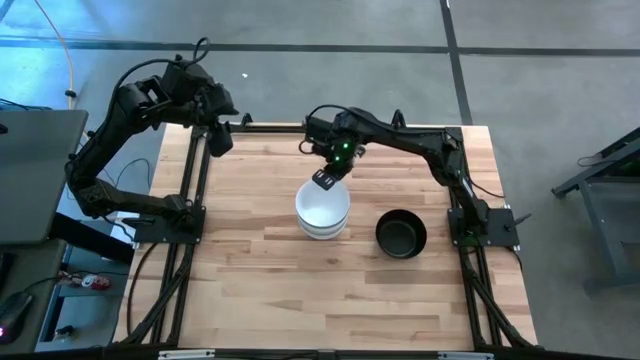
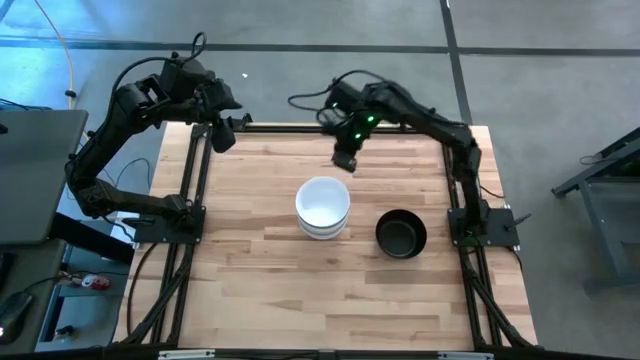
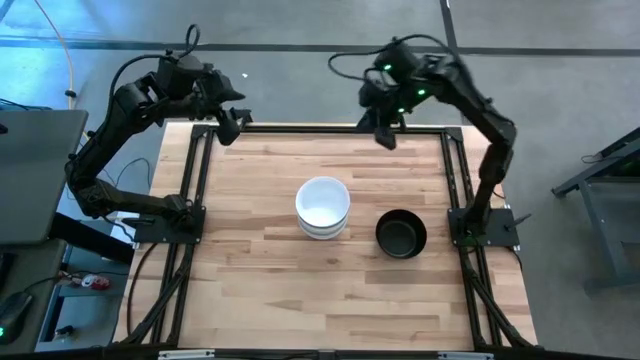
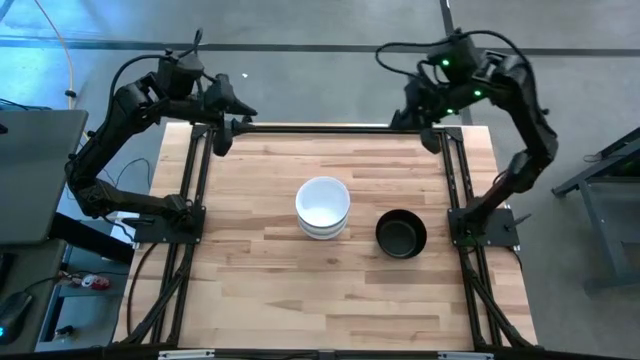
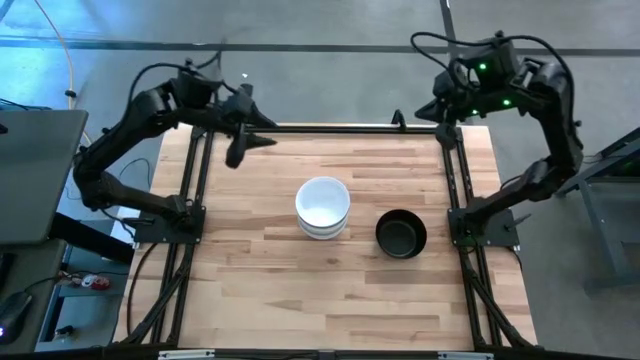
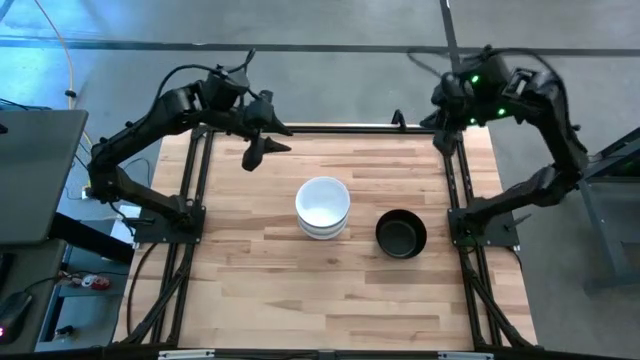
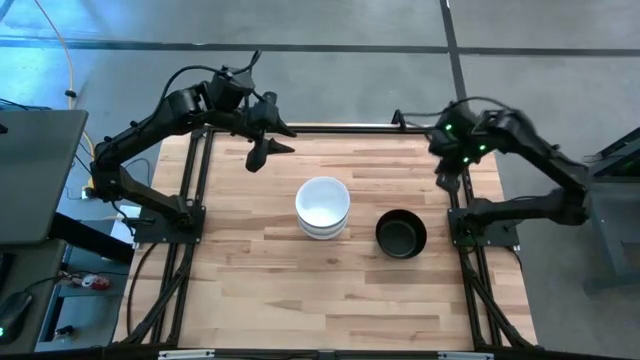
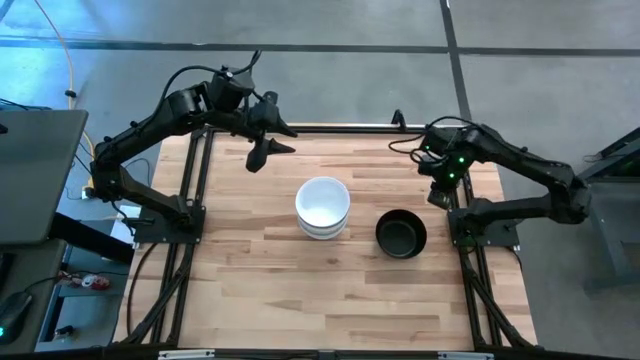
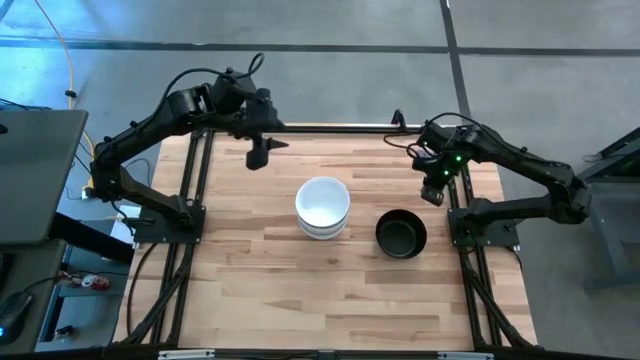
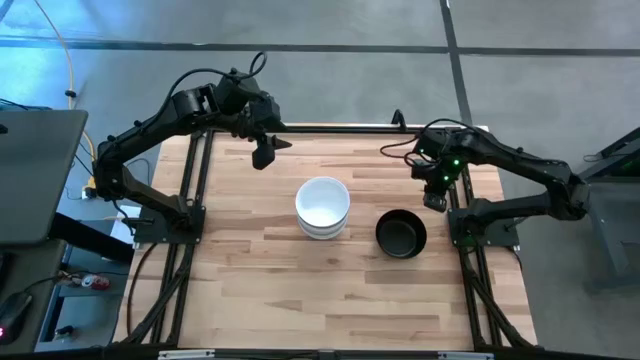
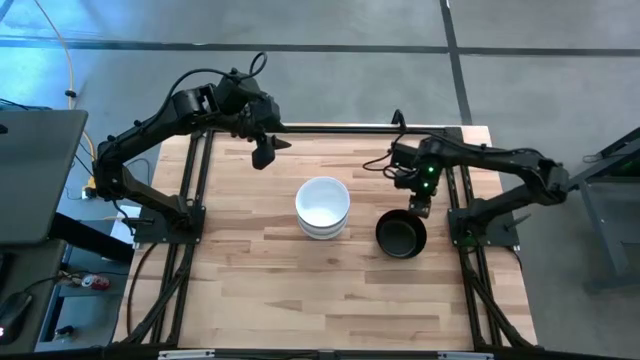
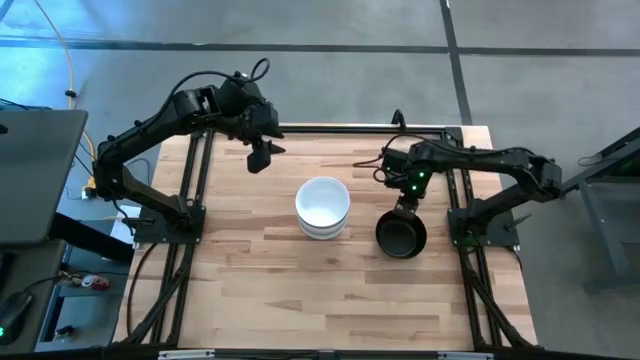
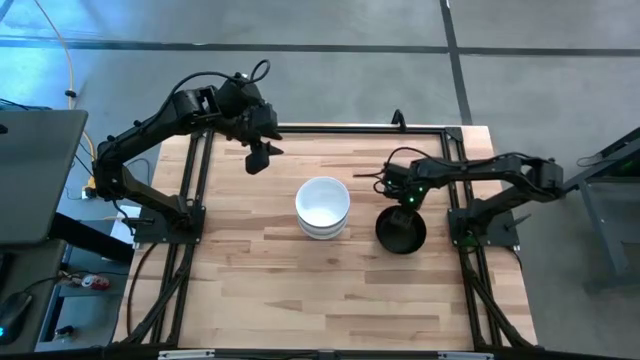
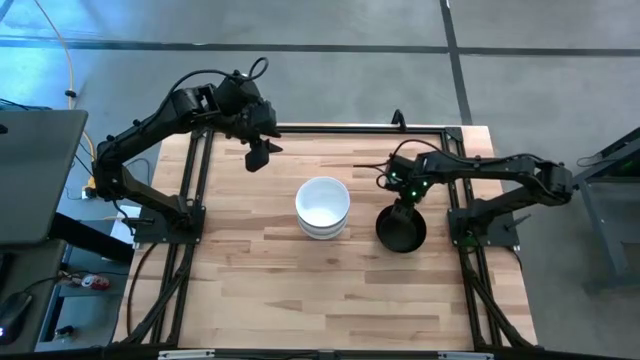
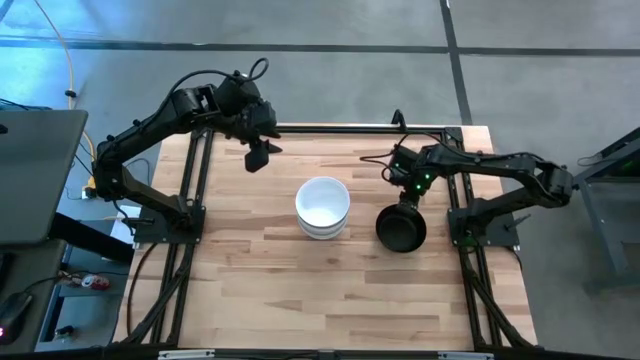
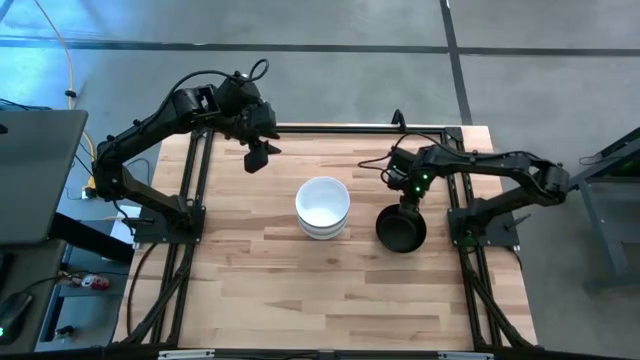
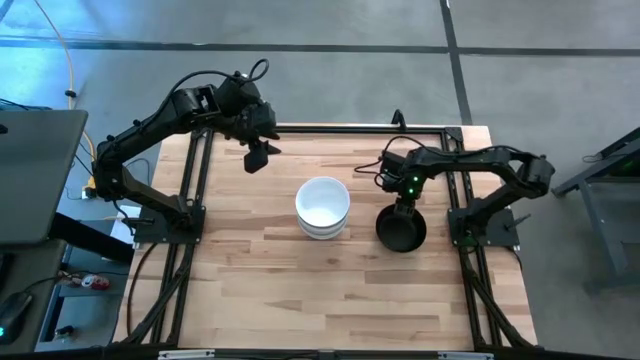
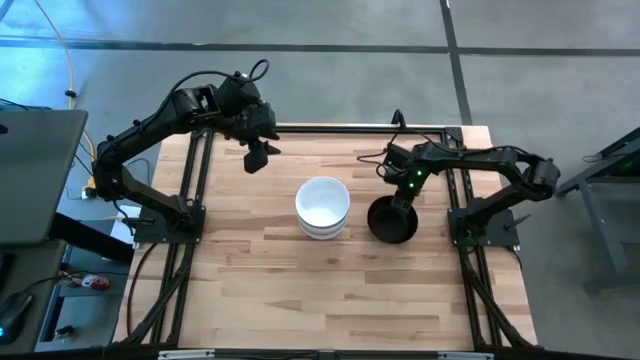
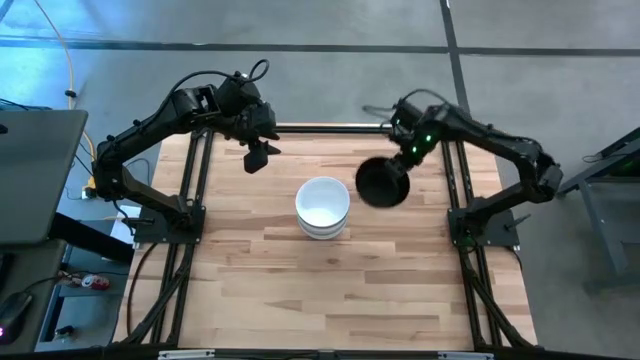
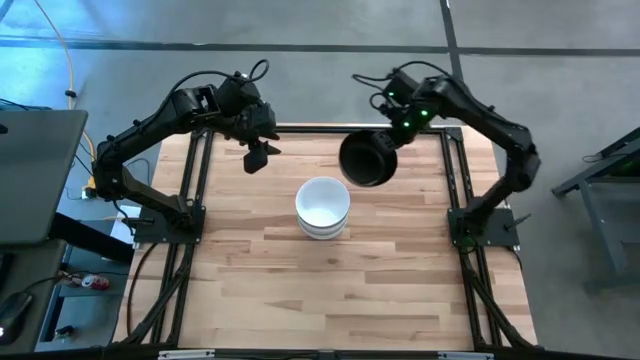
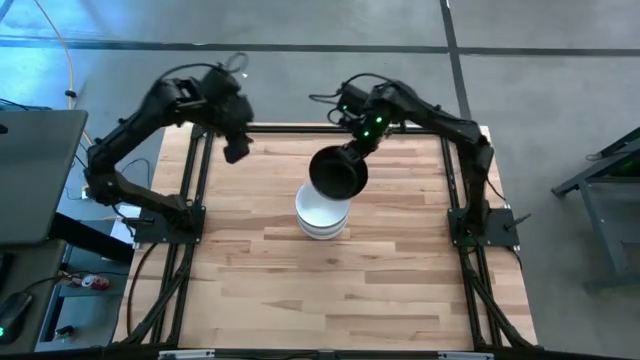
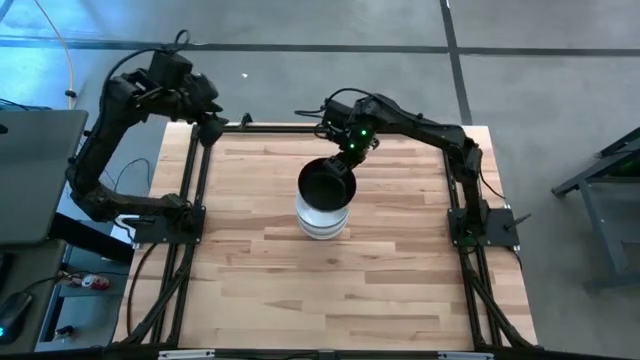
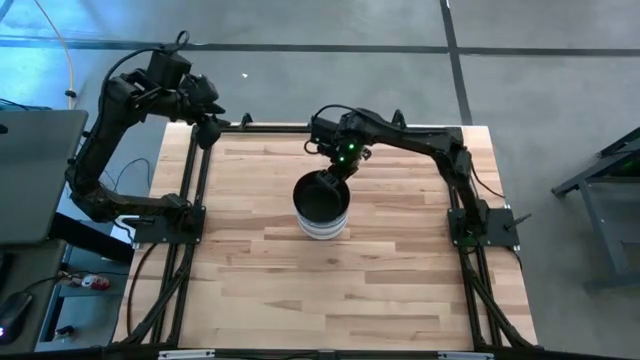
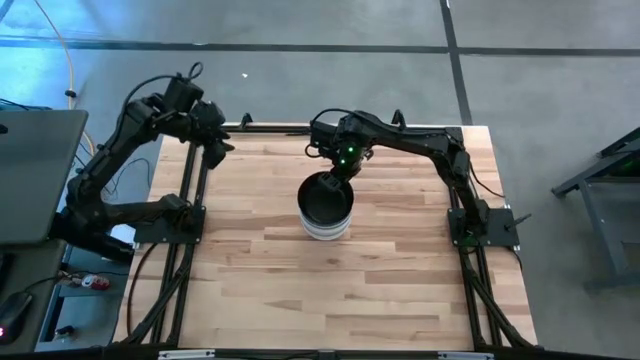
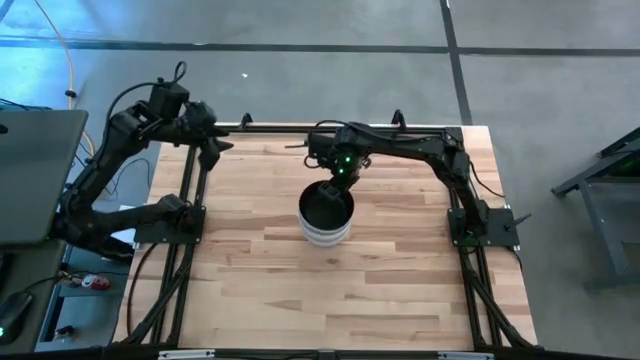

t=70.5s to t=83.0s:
Task: Nest bowls inside each other
Stack the black bowl on top of the white bowl

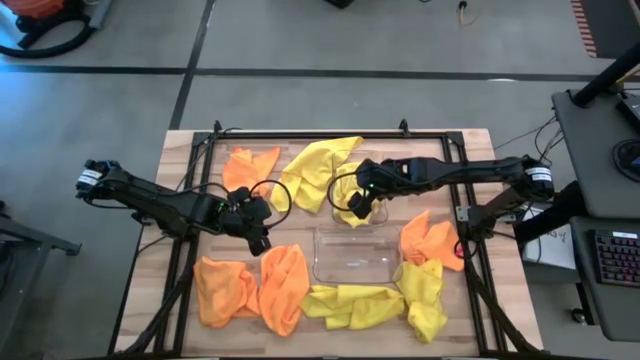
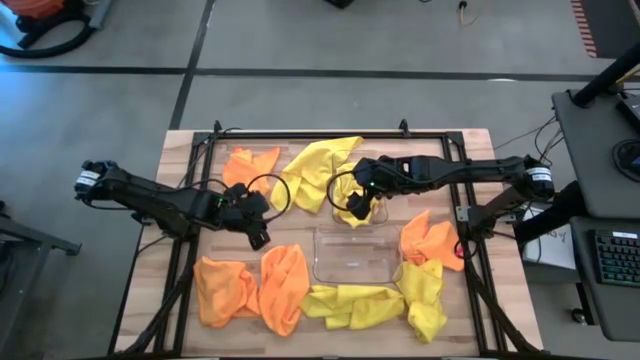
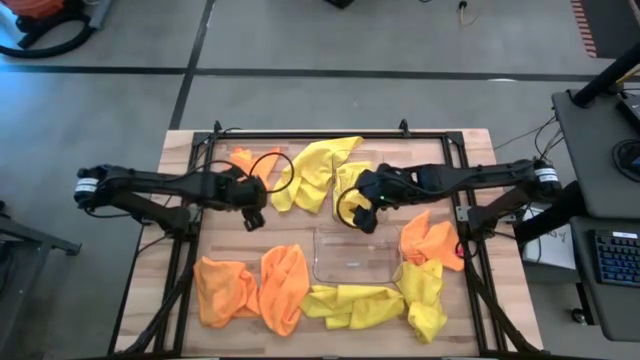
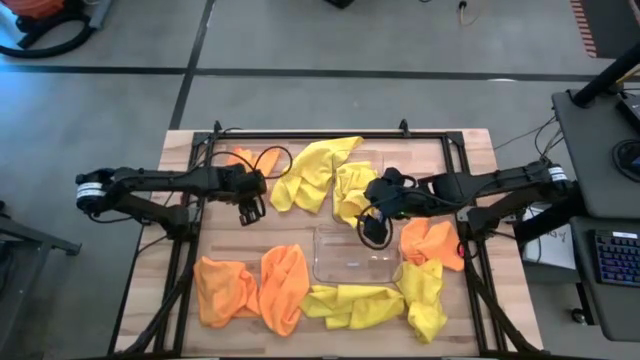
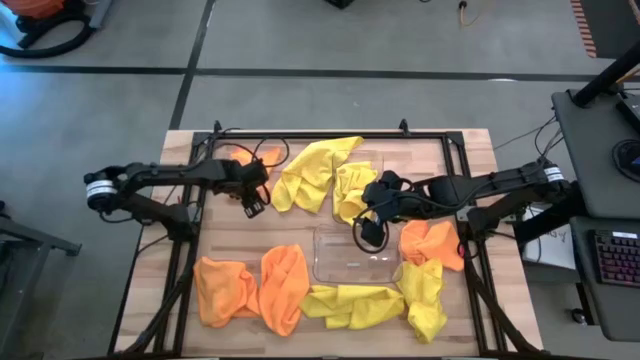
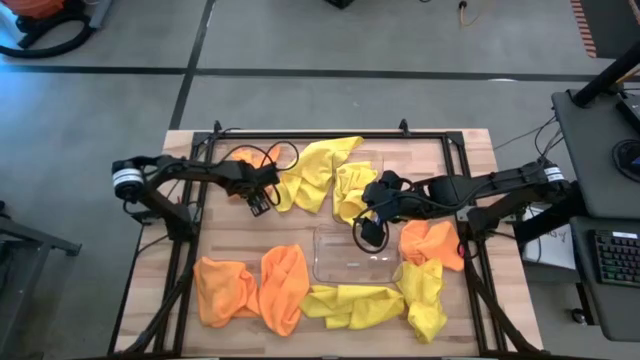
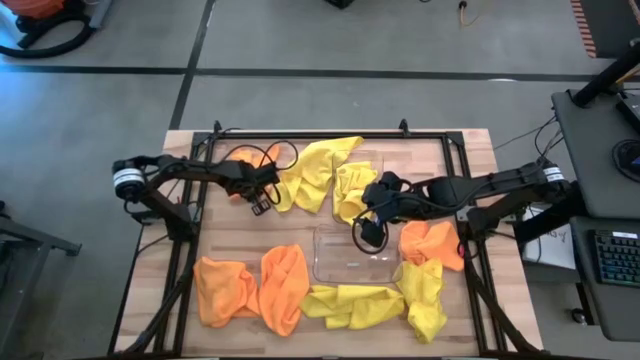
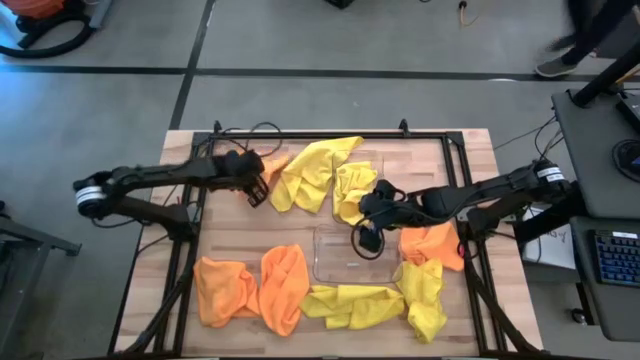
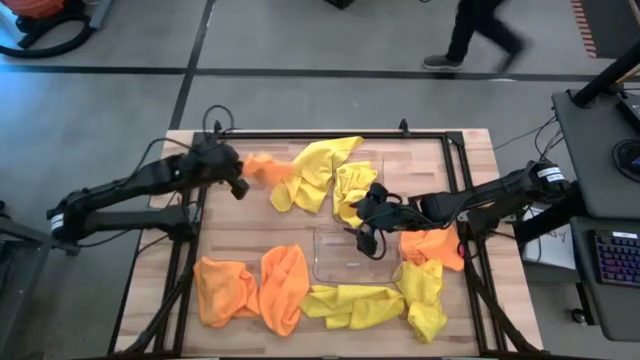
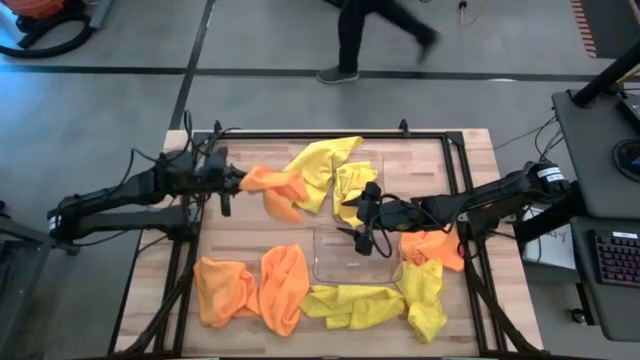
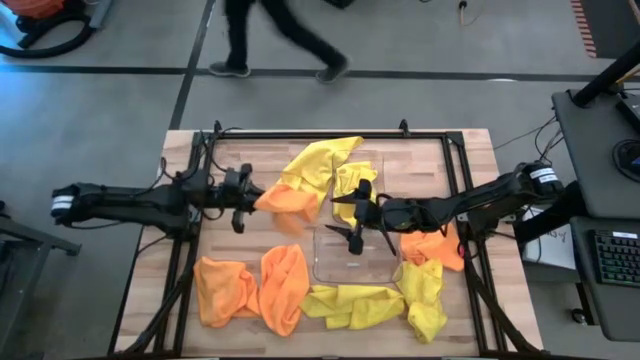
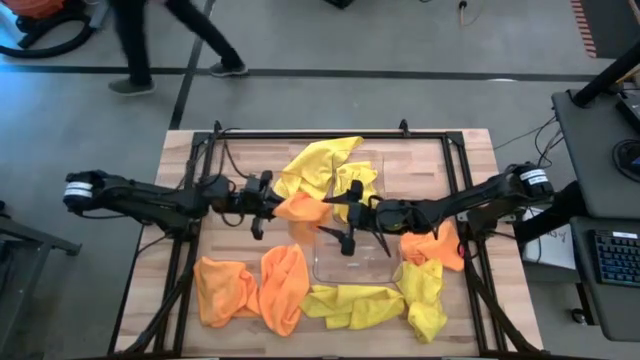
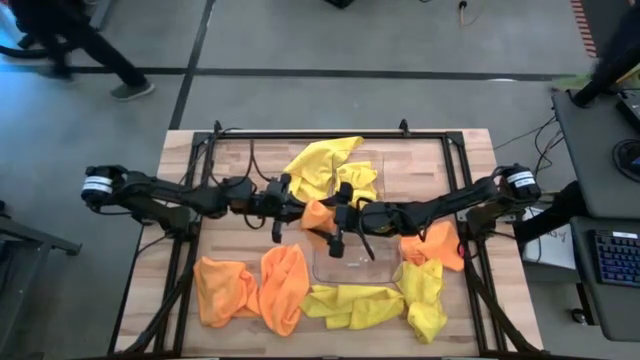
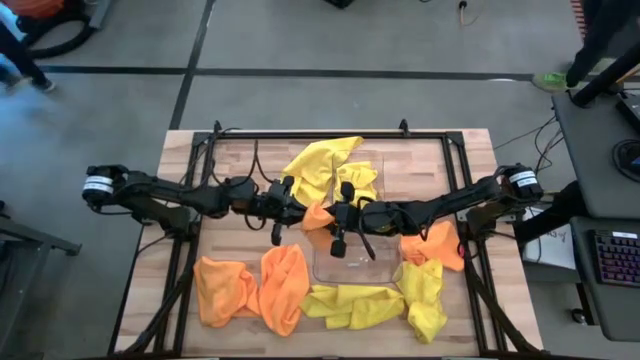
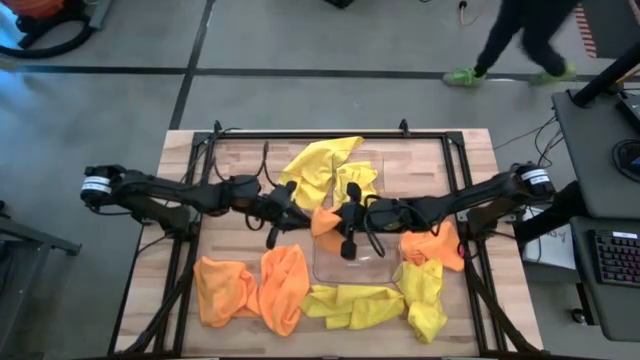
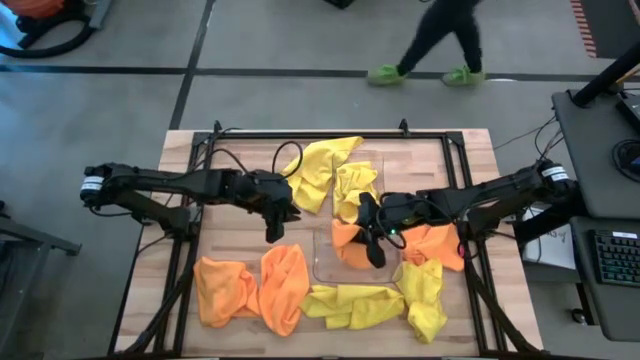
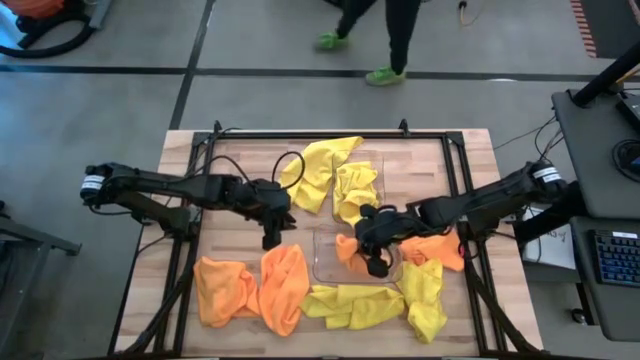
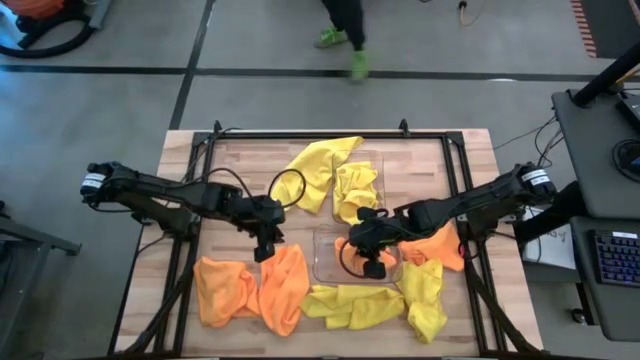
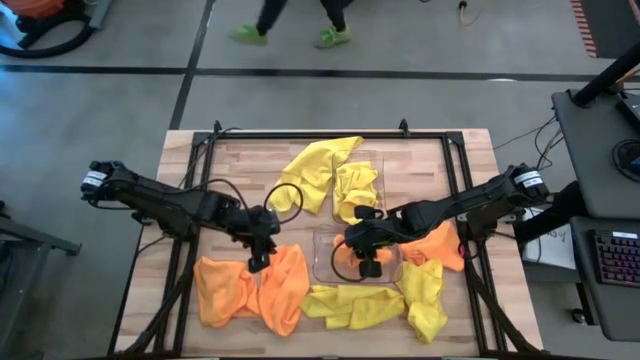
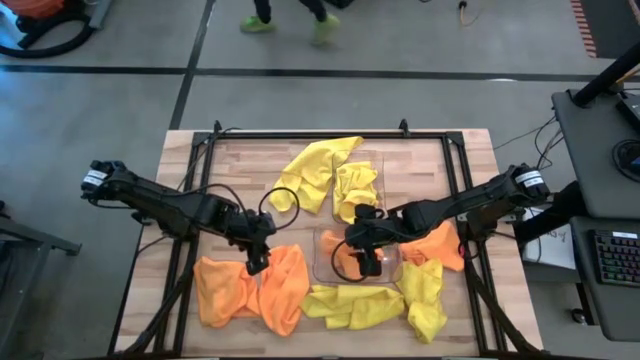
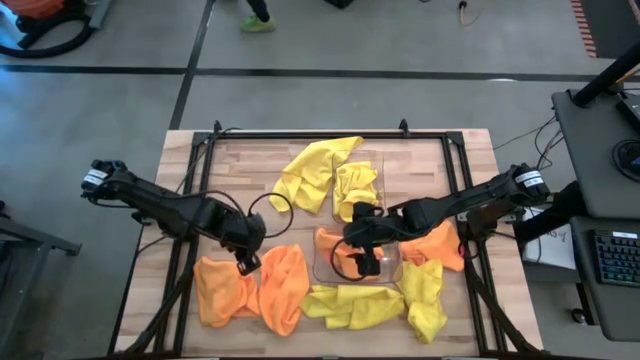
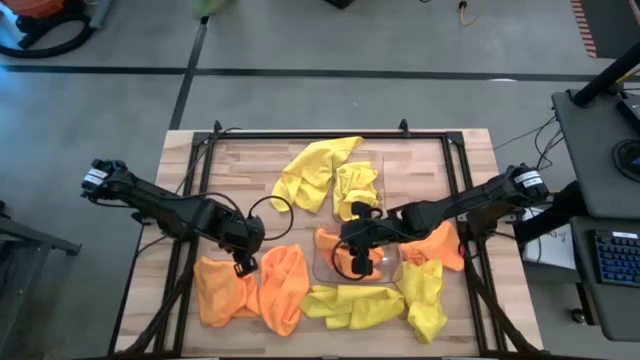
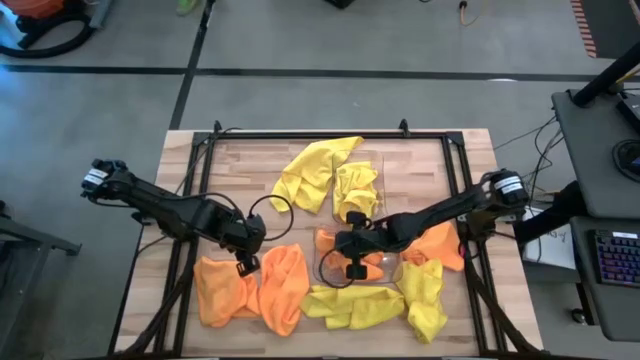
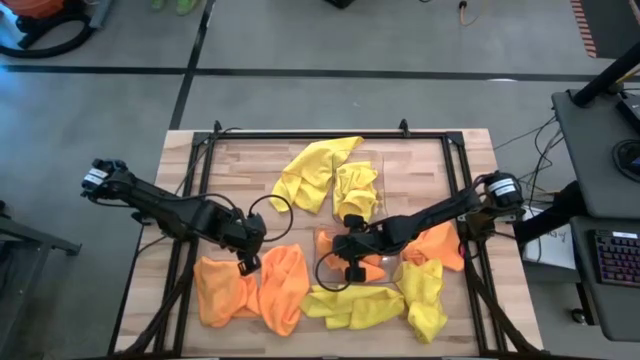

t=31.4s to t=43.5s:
Task: Sort microfiber towel by color & place in baskets
Put the orange towel into the bottom transparent bin
